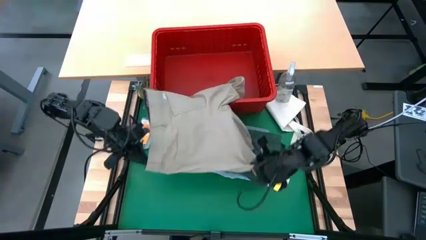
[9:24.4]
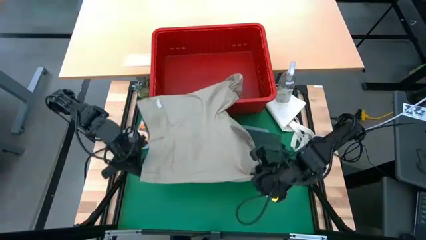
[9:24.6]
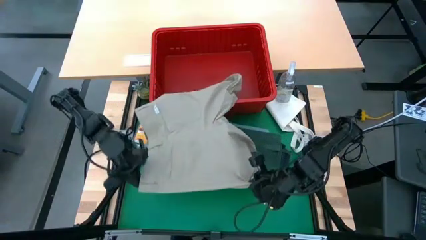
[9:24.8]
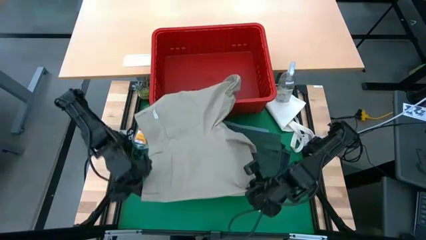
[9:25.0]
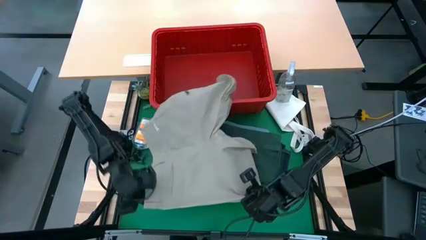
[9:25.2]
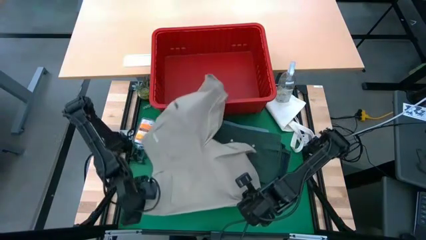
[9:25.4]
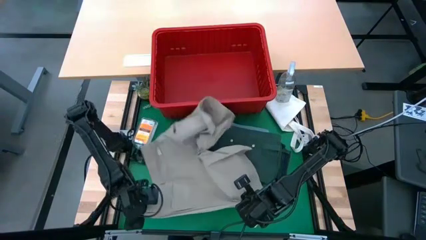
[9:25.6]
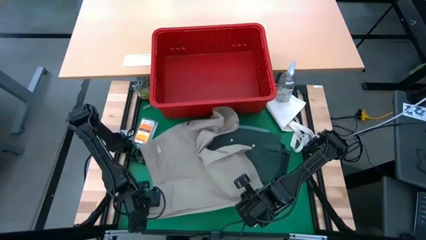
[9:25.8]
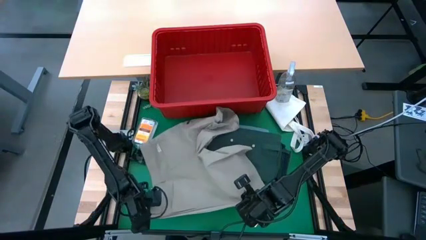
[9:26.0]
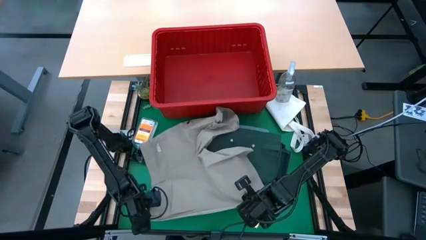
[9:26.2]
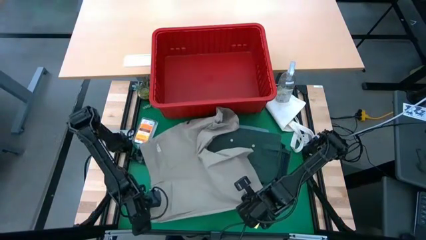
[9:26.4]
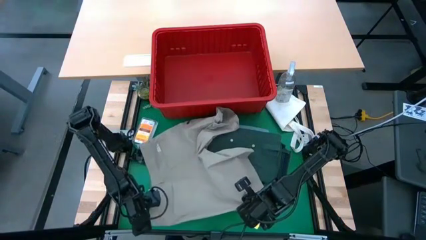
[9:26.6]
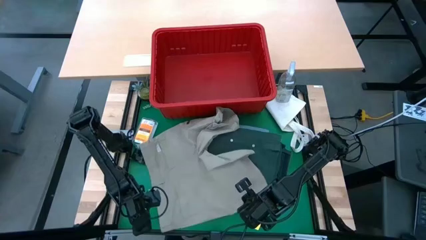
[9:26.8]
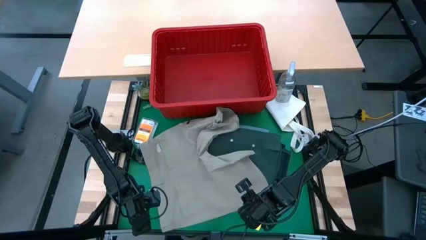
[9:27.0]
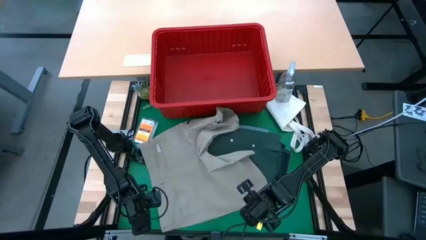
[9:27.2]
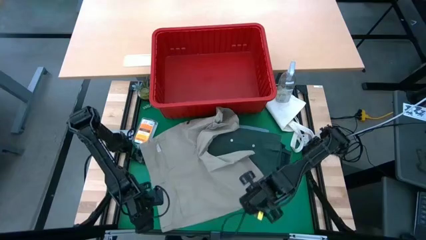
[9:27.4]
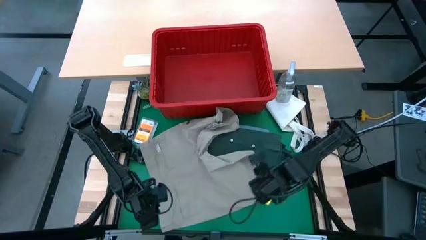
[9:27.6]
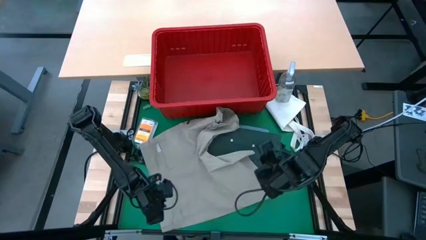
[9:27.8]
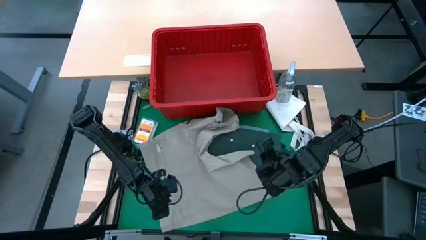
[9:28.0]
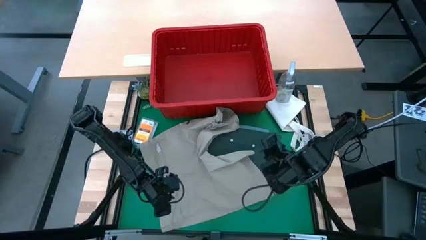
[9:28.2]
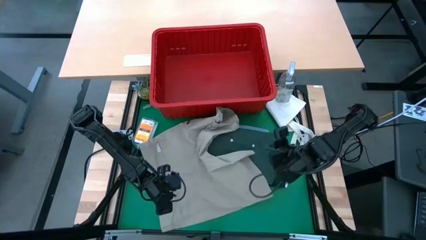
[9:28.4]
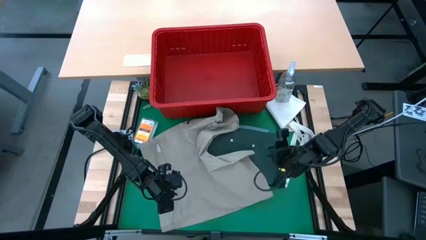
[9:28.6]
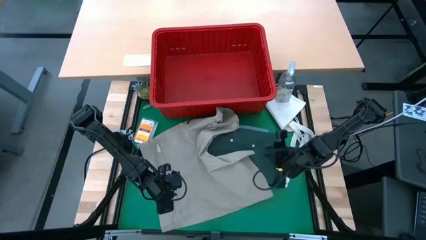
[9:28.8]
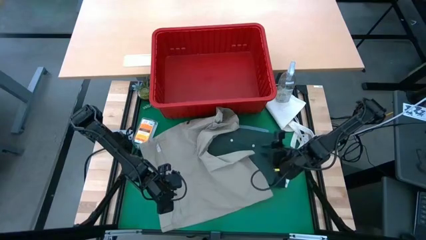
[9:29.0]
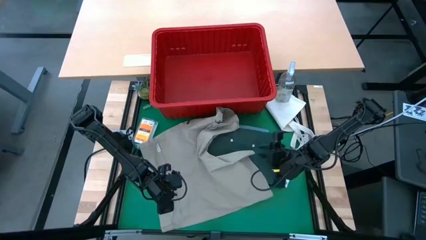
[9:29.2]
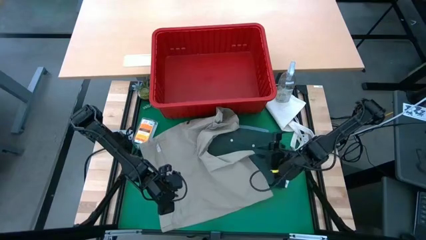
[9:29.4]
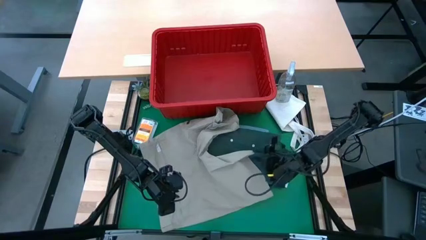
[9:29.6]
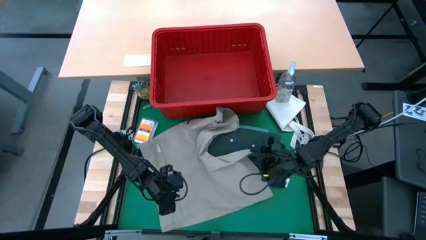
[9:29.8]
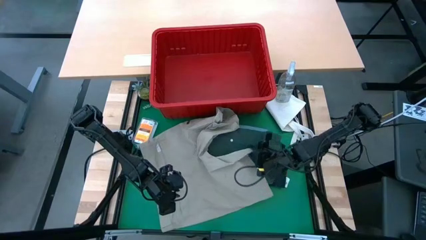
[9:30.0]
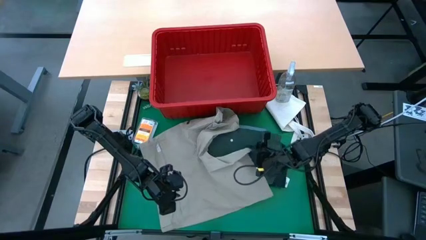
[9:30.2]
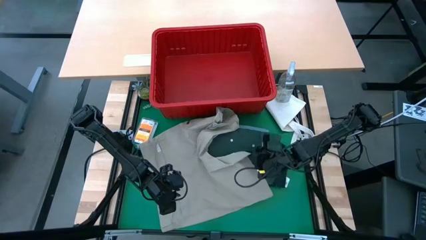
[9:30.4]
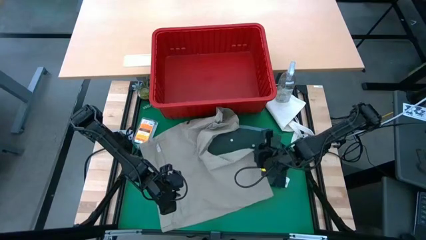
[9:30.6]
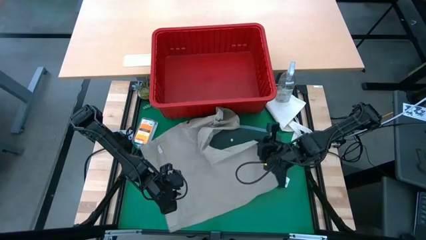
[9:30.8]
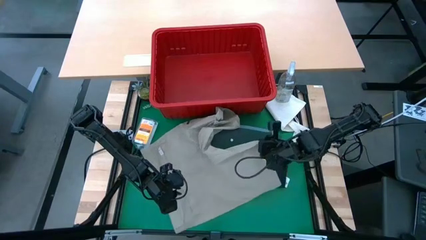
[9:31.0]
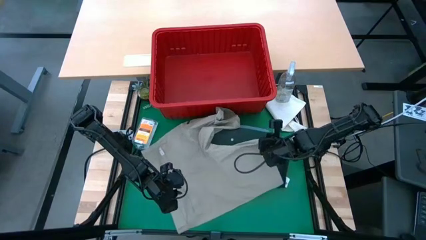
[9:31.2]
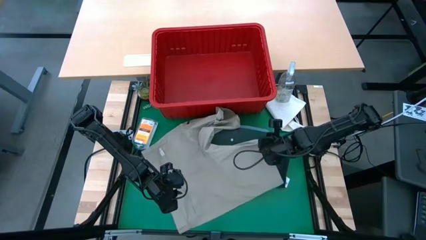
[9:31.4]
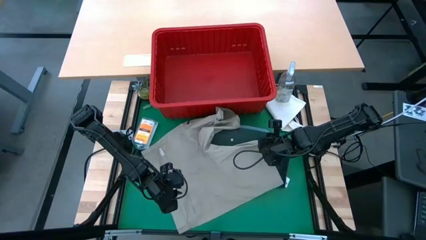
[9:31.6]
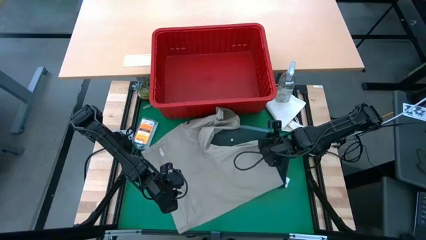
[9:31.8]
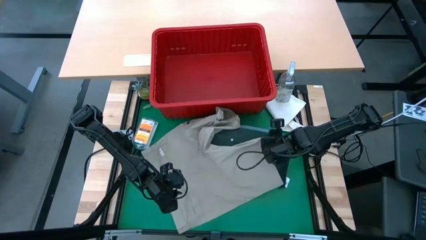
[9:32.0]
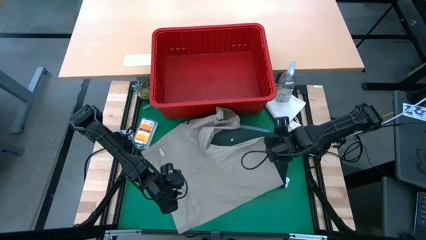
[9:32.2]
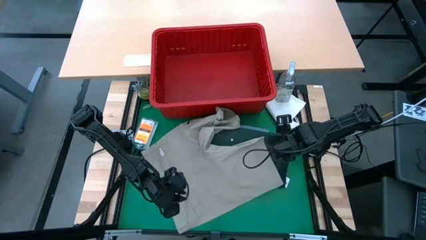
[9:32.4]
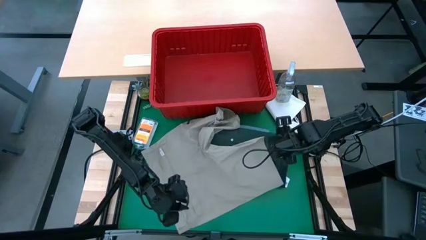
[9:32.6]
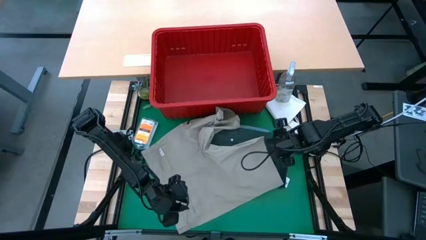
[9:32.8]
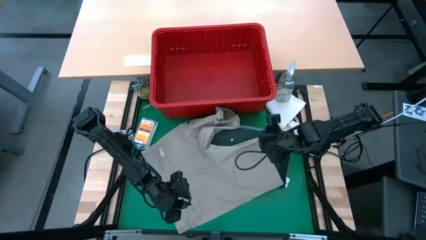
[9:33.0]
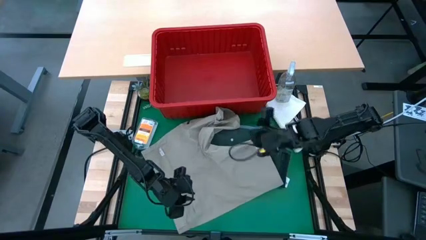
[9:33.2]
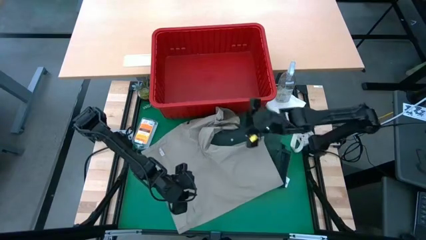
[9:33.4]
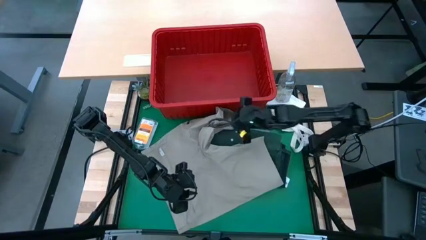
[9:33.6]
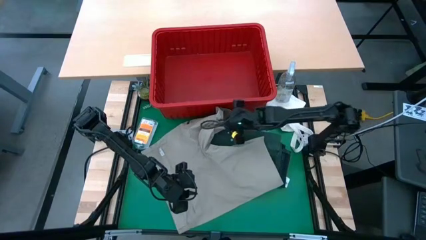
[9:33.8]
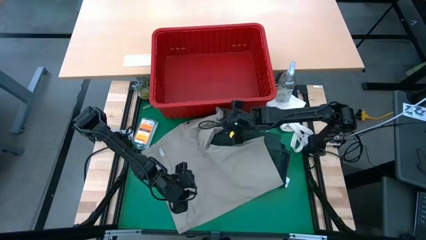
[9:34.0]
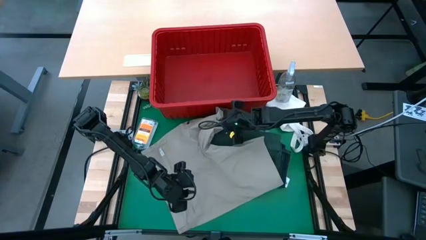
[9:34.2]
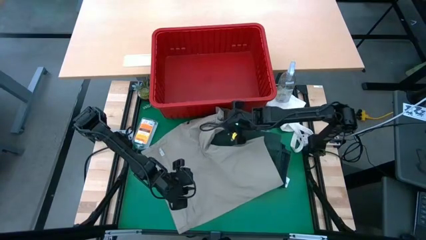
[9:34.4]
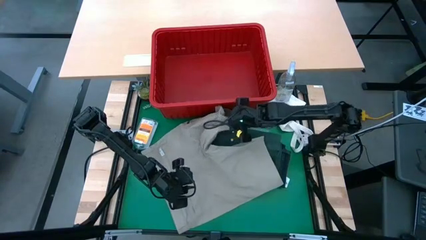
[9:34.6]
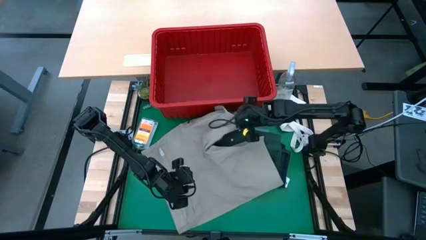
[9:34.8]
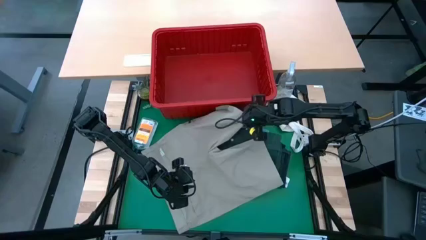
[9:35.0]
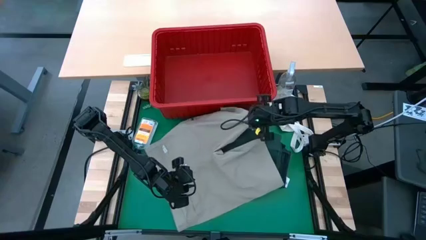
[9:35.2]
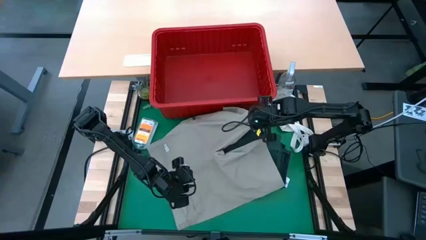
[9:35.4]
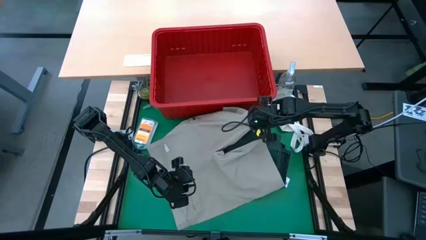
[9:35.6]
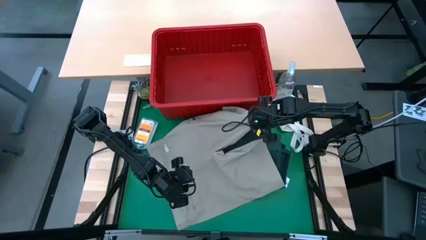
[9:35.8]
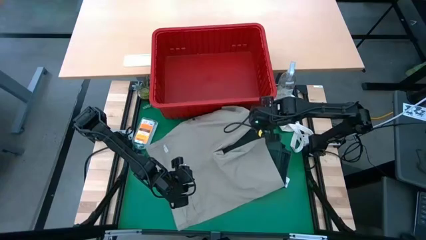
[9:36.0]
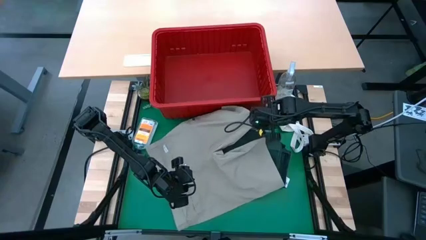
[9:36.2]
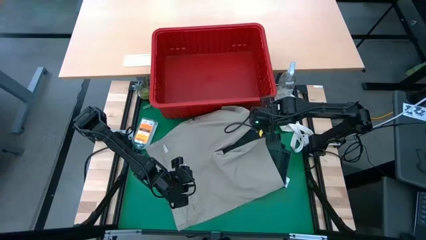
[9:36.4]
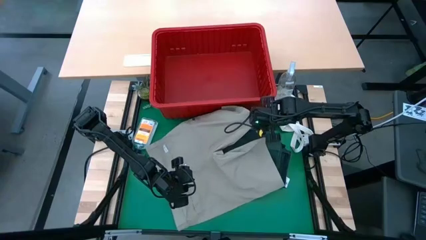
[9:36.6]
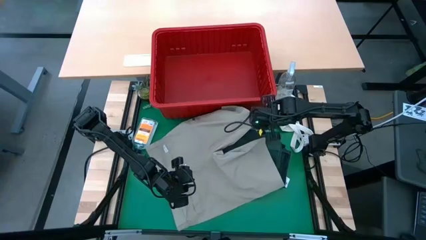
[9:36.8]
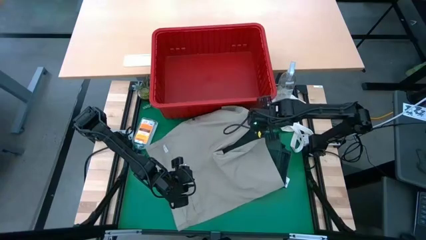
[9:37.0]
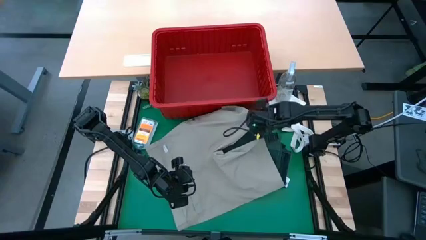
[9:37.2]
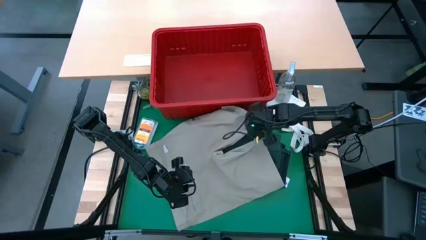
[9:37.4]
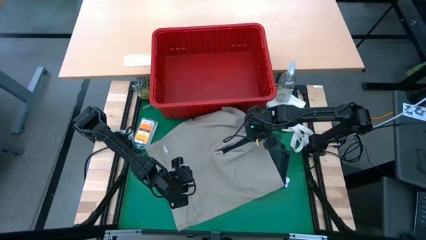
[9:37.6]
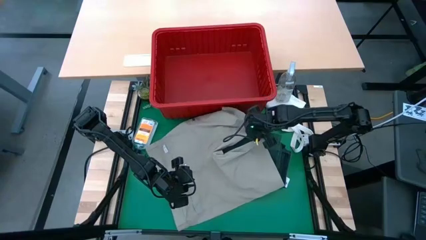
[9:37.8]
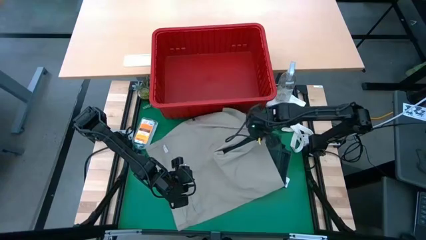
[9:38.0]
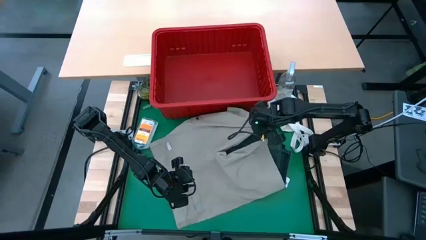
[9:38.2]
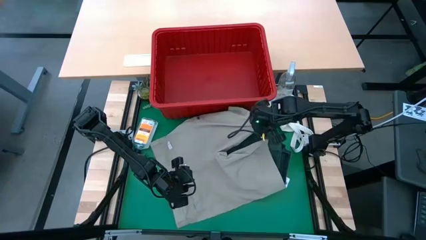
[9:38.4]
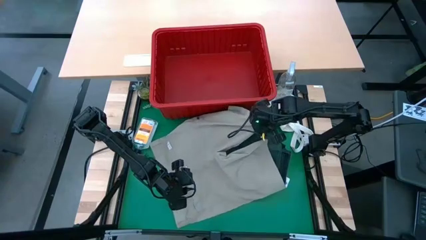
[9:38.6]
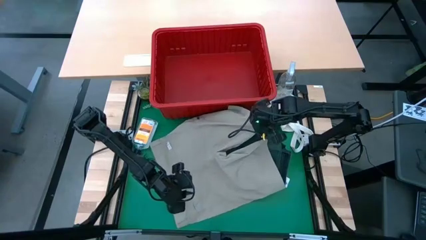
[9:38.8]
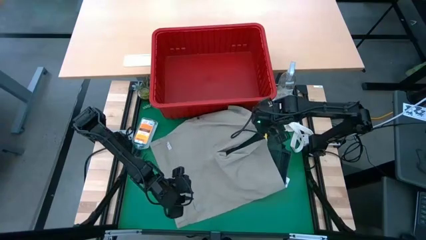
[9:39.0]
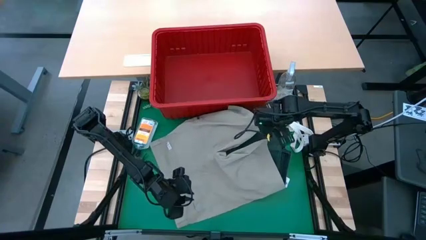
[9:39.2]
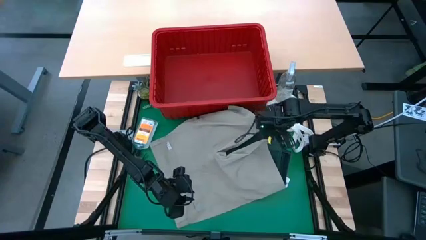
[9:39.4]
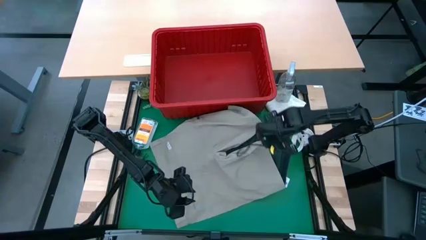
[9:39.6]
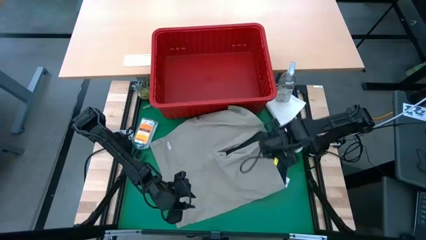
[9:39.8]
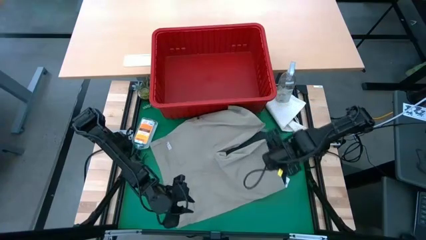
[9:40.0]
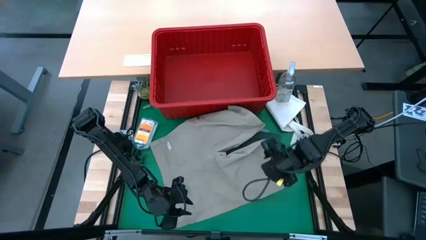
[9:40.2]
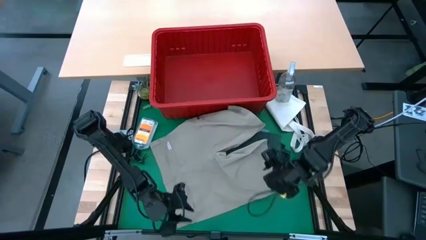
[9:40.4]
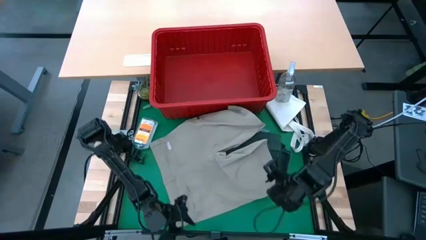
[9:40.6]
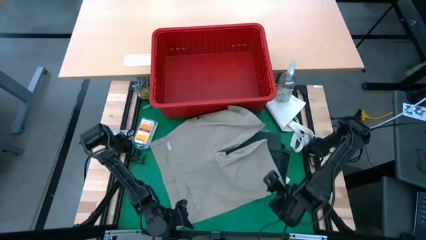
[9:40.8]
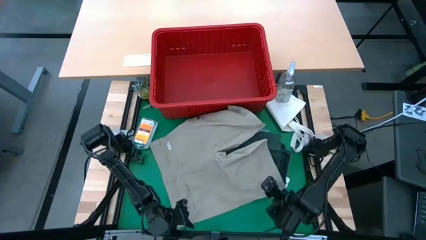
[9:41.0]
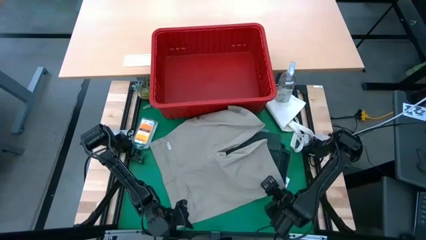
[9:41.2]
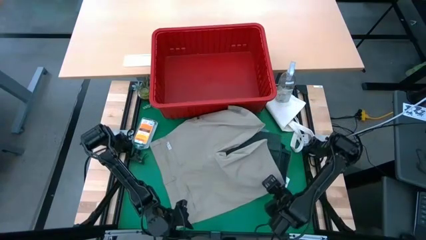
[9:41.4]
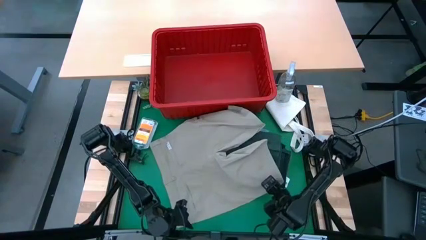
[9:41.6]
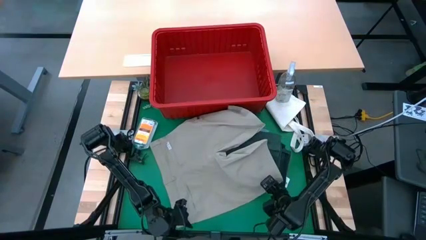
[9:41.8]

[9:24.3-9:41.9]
Task: Fold laundry
Fold the beige shorts
